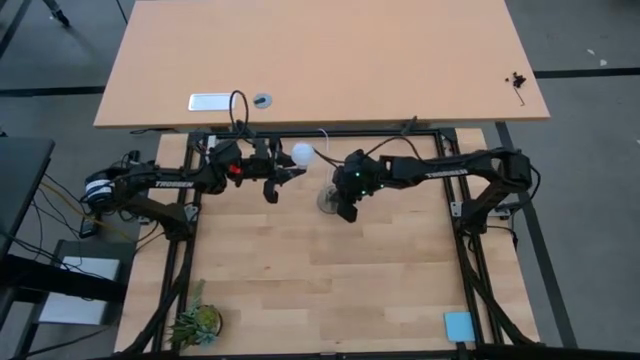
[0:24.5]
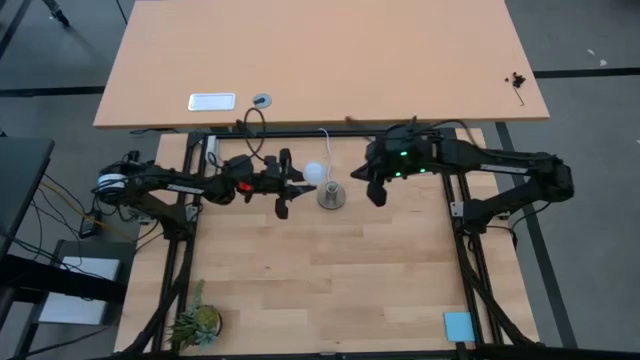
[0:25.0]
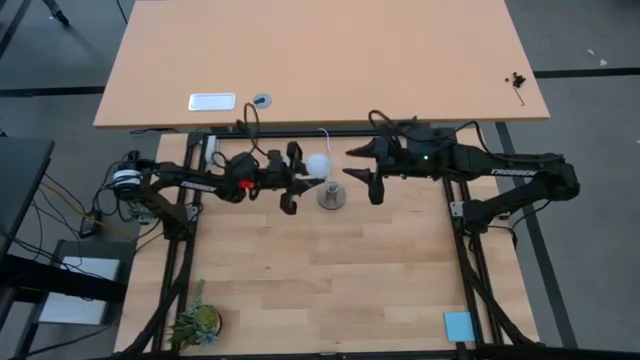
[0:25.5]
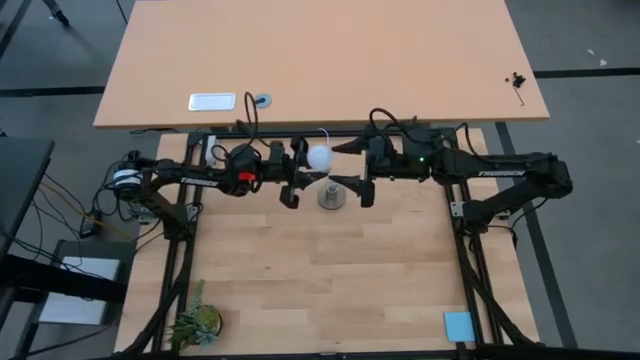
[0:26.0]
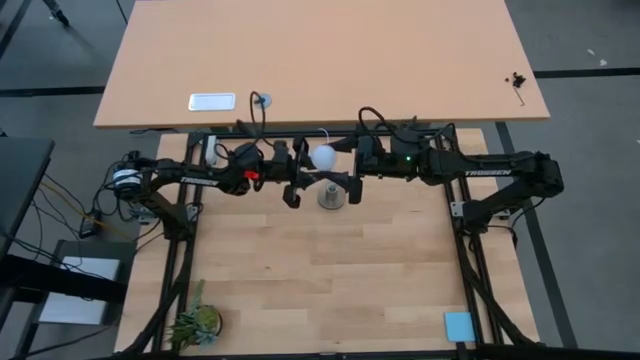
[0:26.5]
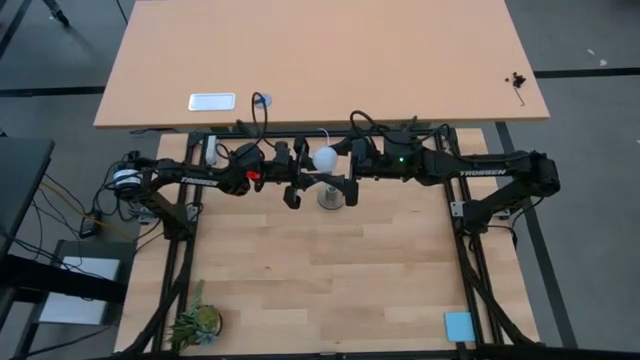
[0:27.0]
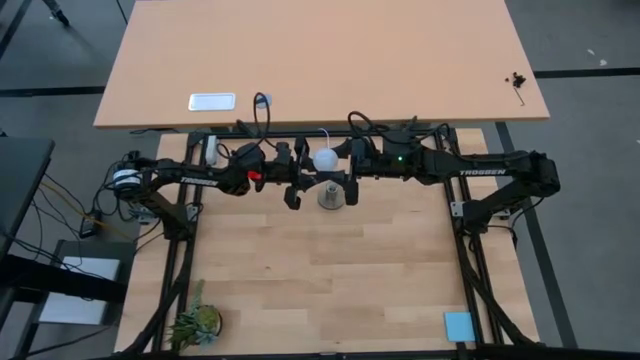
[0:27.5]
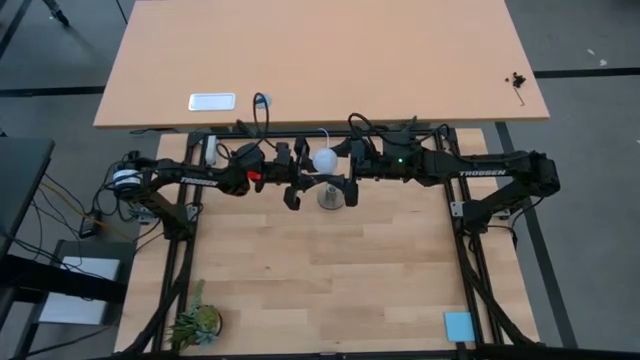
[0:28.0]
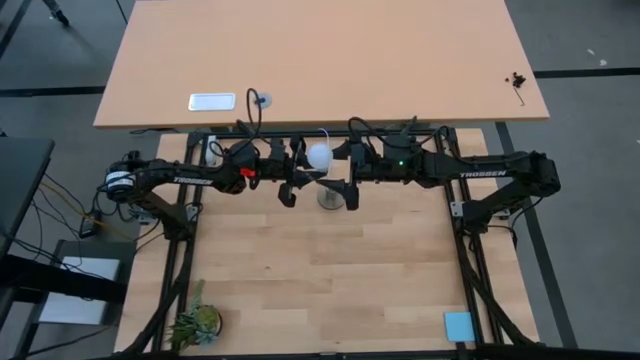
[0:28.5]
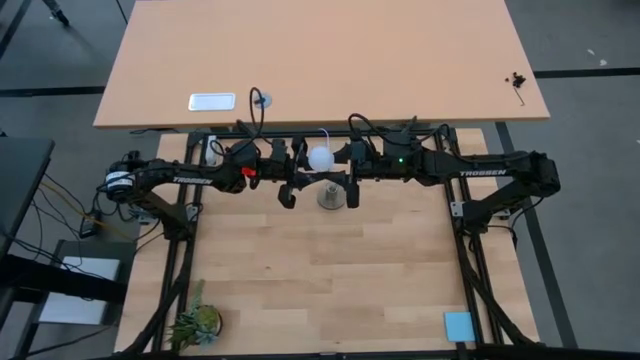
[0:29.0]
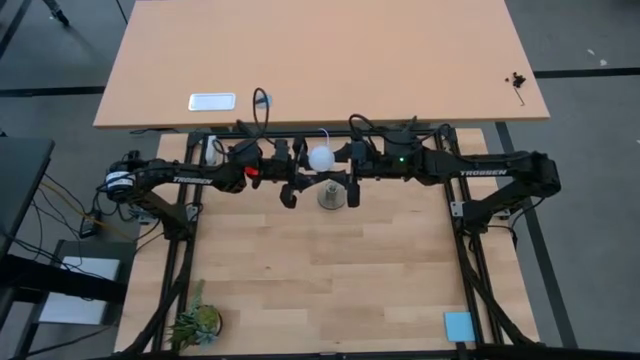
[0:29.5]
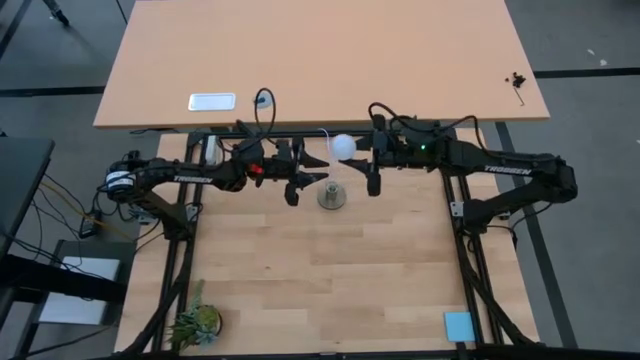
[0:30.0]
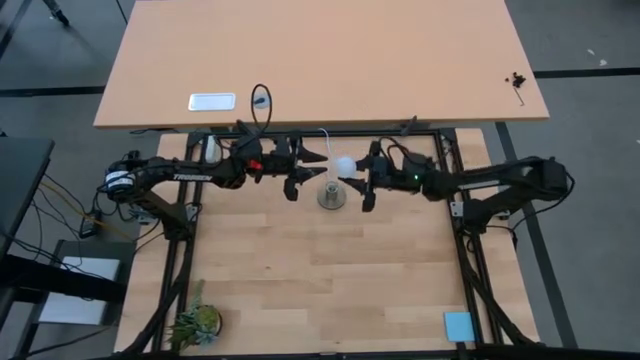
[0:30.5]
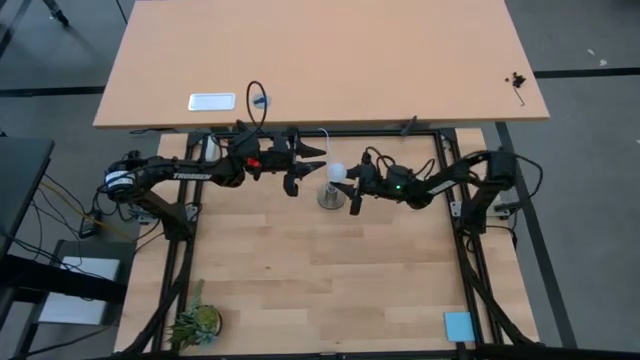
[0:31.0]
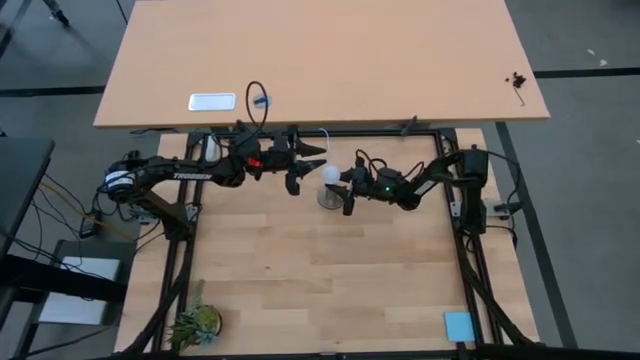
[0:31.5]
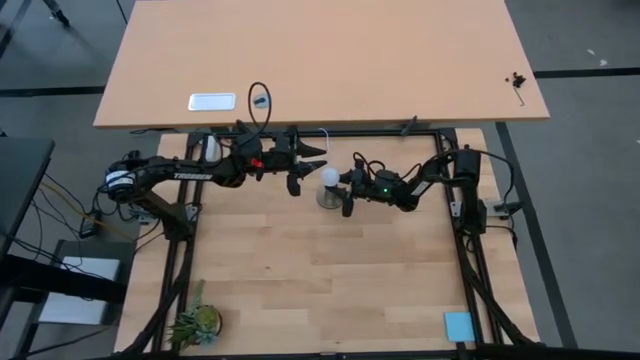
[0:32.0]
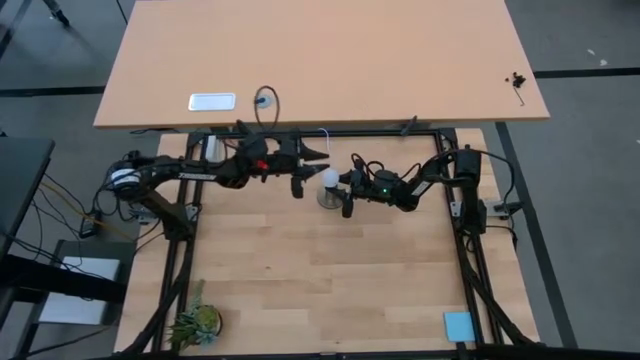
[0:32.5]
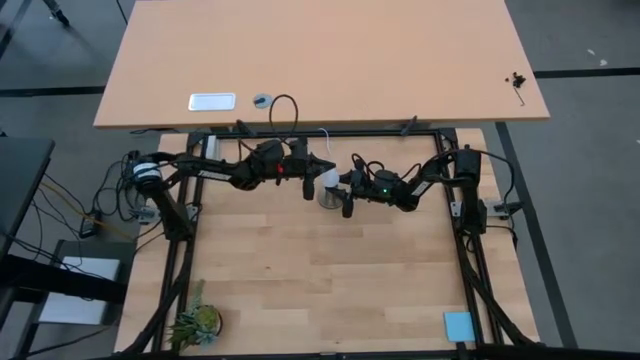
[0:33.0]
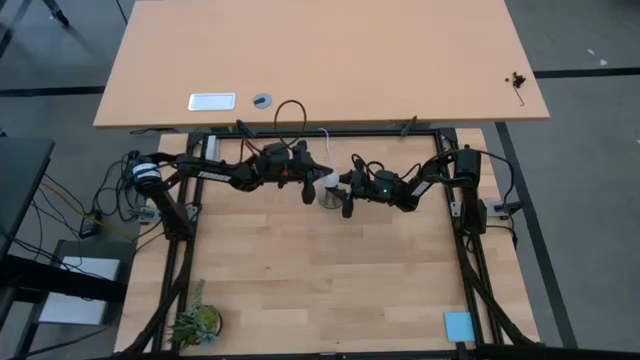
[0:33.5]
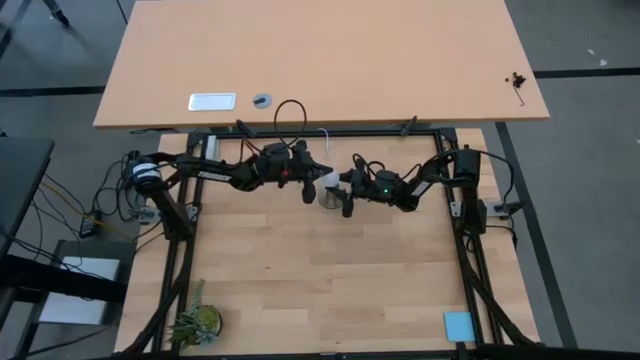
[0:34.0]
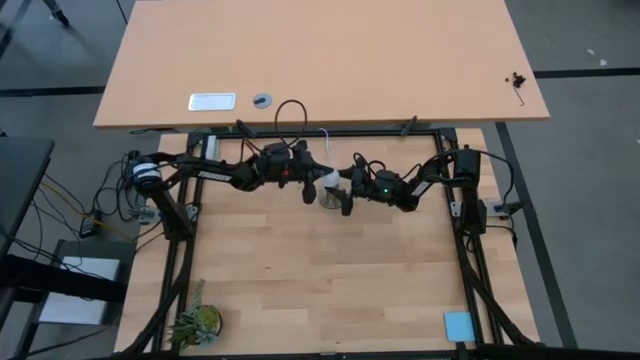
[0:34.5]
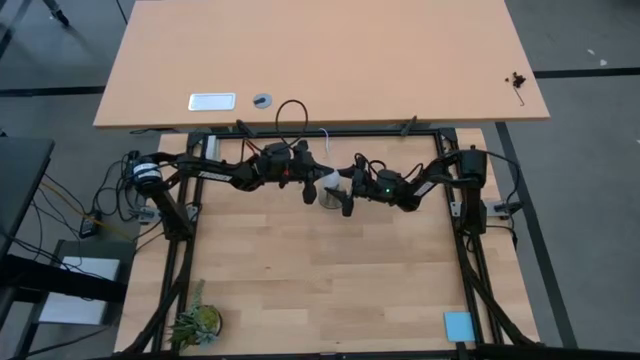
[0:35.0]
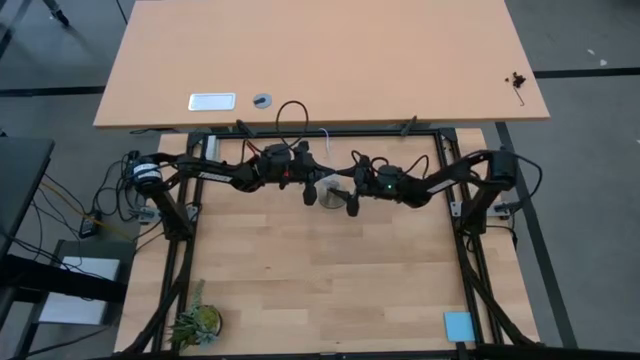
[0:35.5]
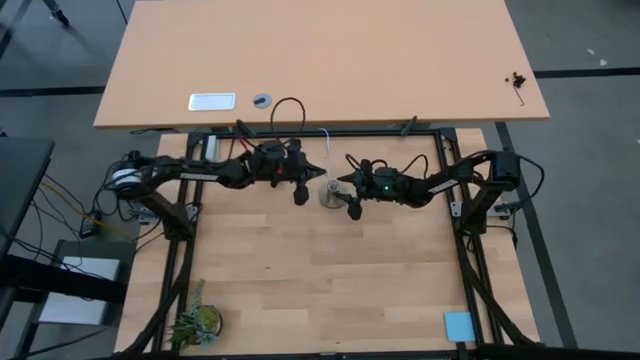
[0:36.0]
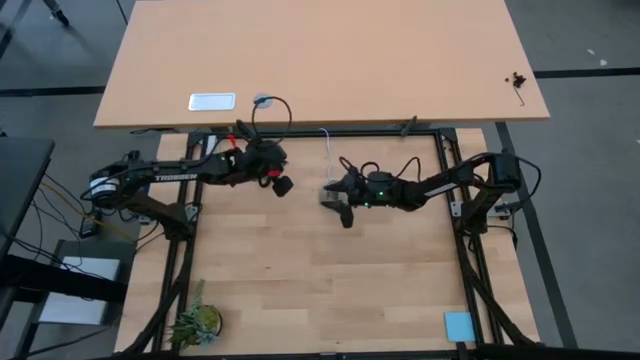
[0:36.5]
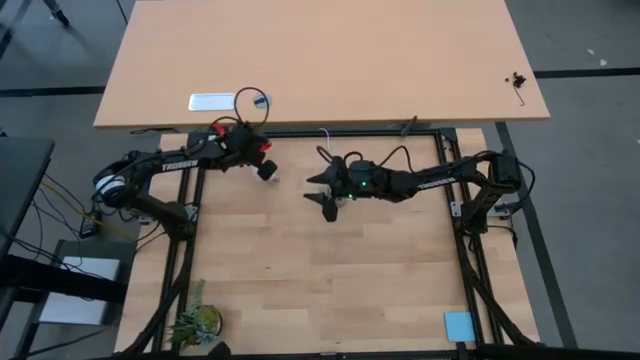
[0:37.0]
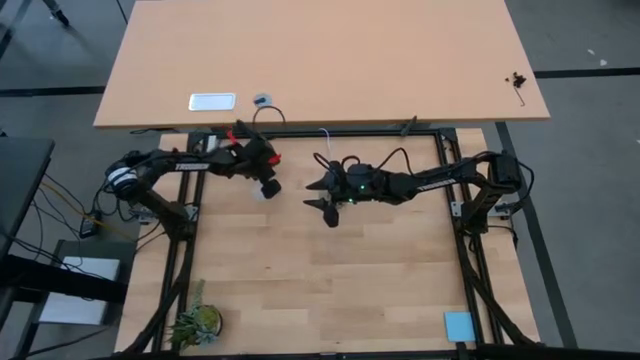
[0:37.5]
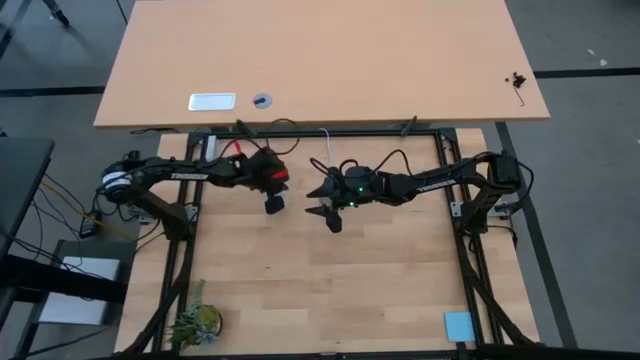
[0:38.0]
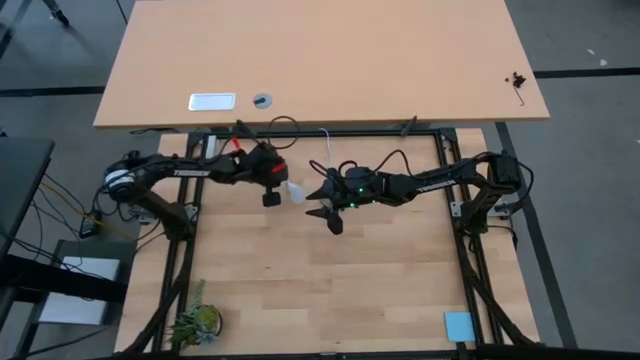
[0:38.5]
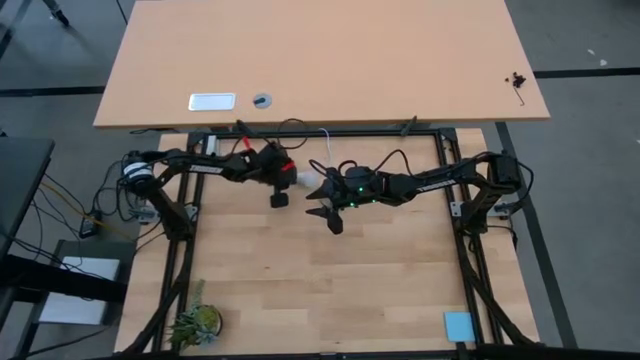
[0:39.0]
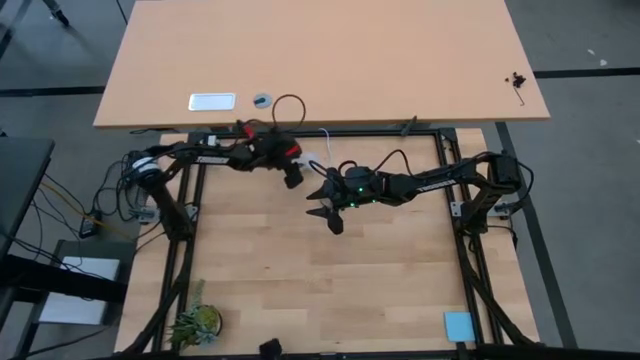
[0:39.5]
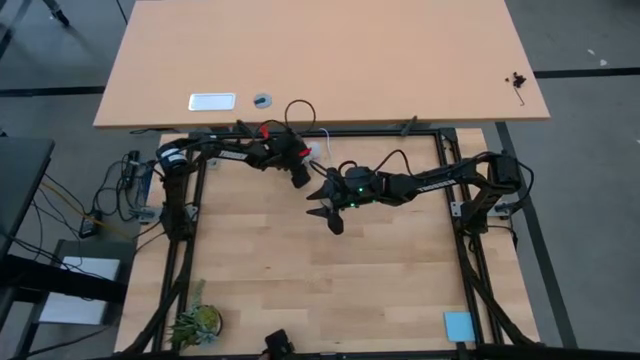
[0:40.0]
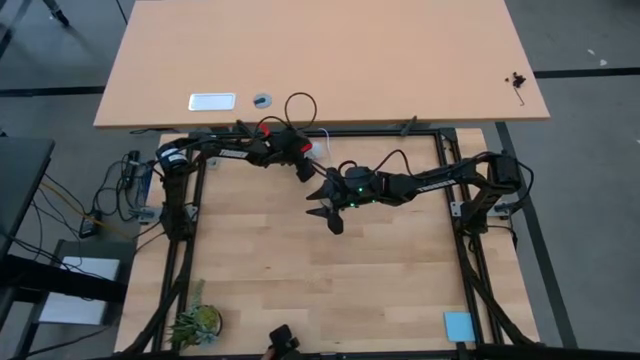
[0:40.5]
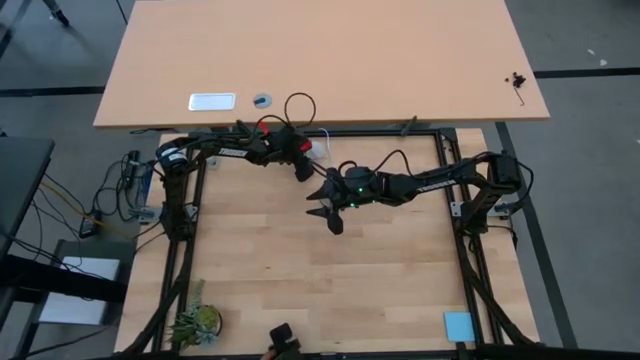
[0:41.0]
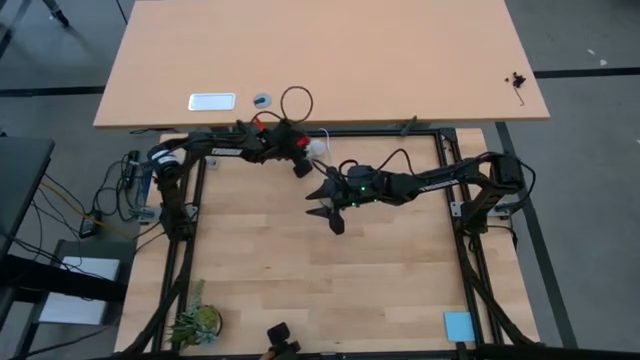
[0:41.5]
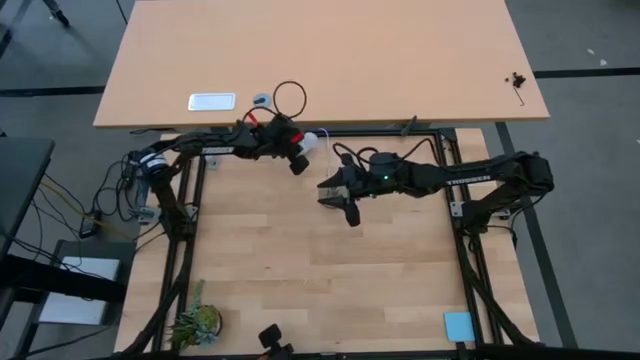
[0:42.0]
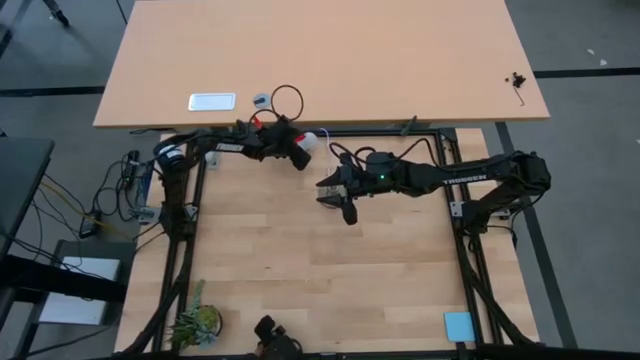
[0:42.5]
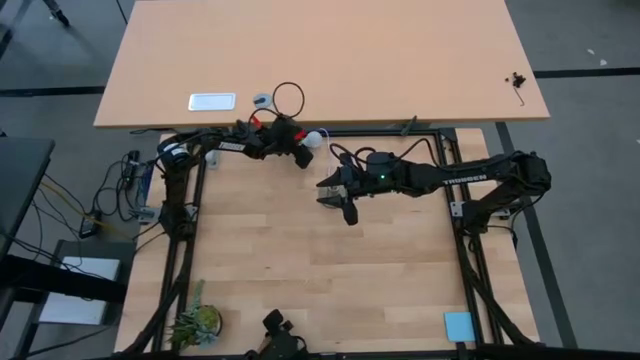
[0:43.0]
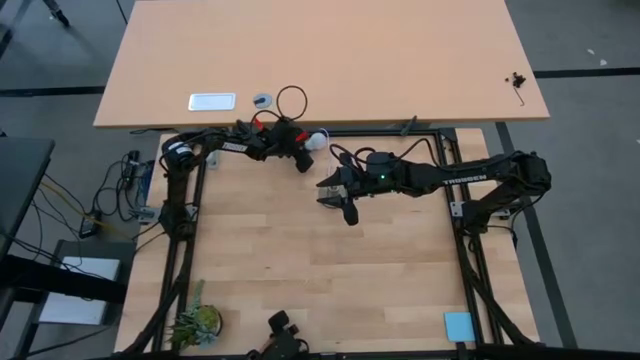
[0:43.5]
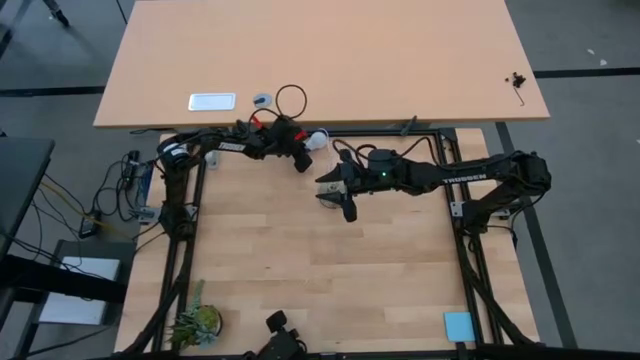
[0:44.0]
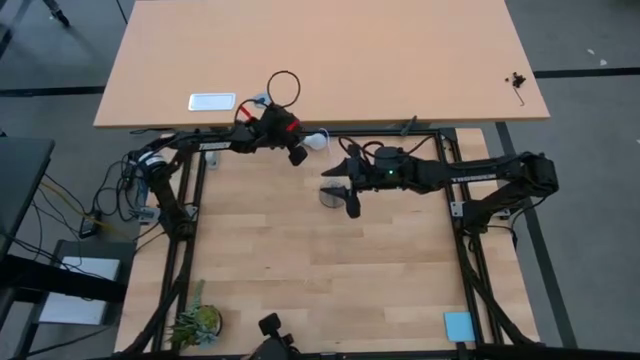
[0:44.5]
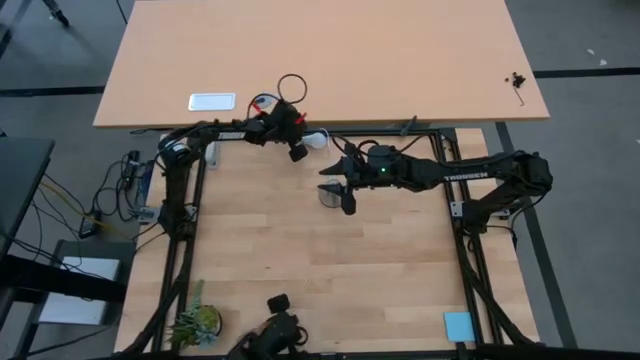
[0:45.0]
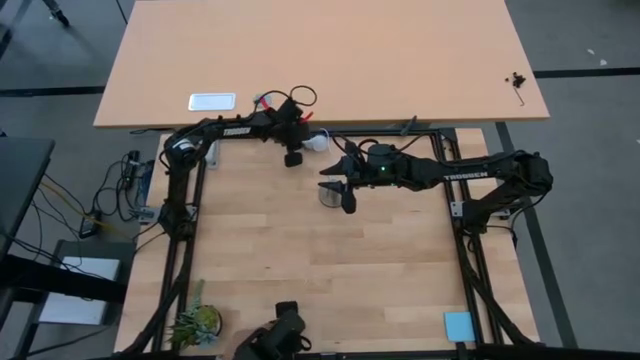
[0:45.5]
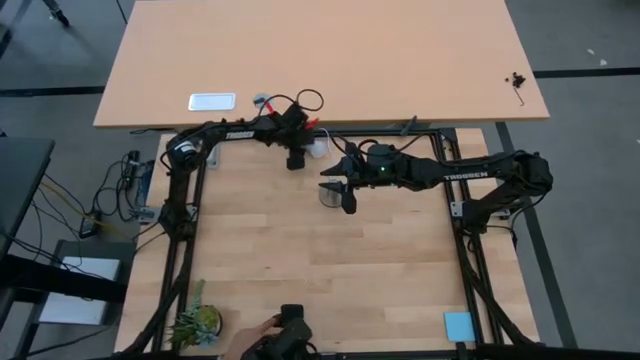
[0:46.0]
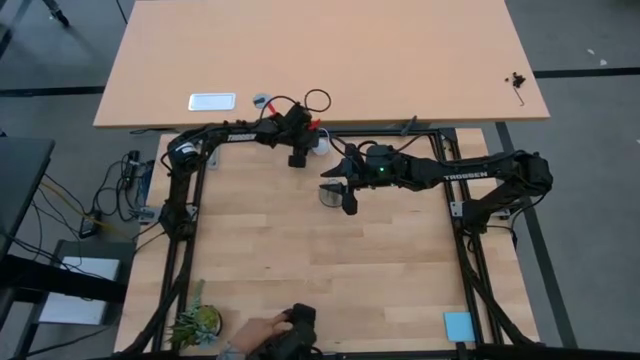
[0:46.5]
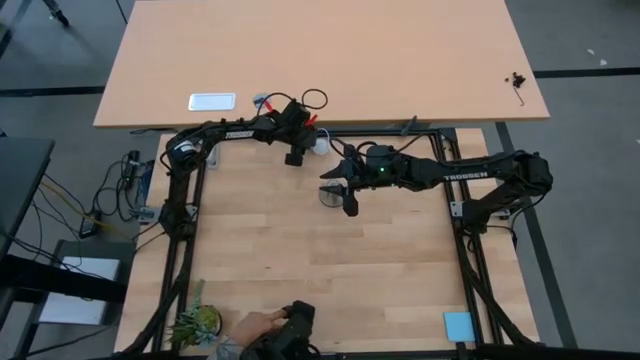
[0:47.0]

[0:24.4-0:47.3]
Task: Screw lightbulb
Insert the white lightbulb into the gold lamp
